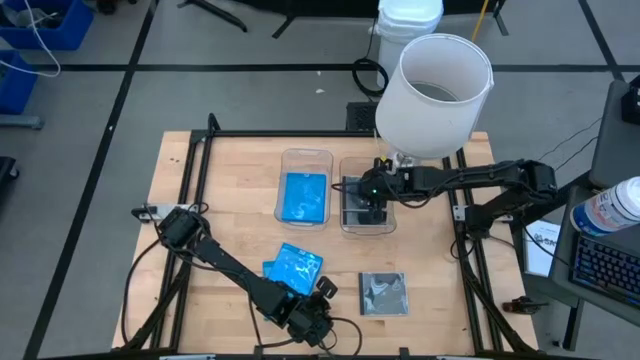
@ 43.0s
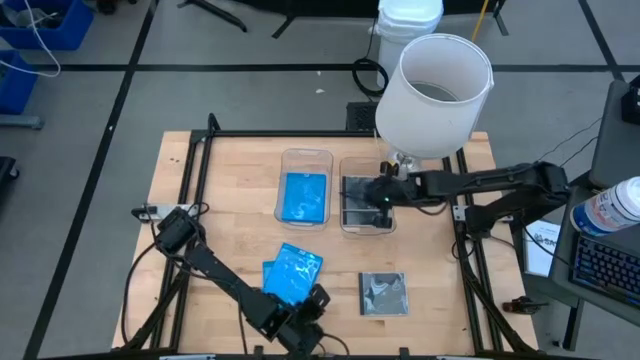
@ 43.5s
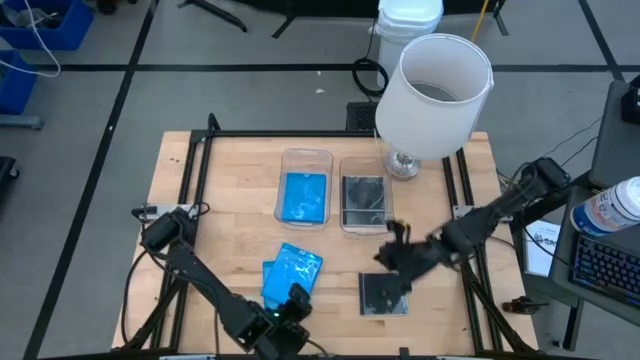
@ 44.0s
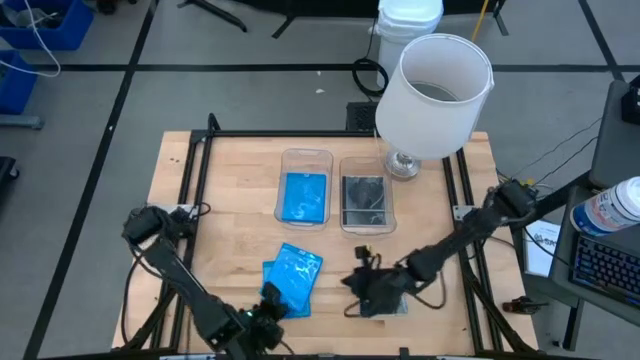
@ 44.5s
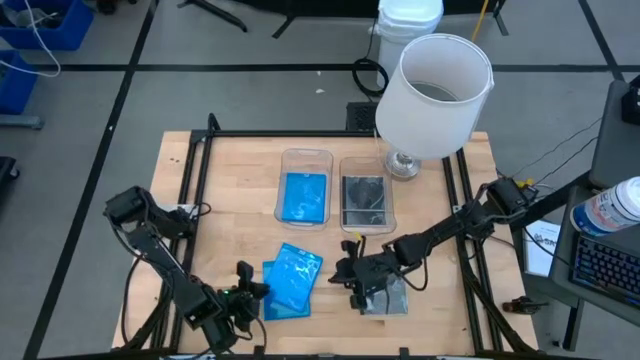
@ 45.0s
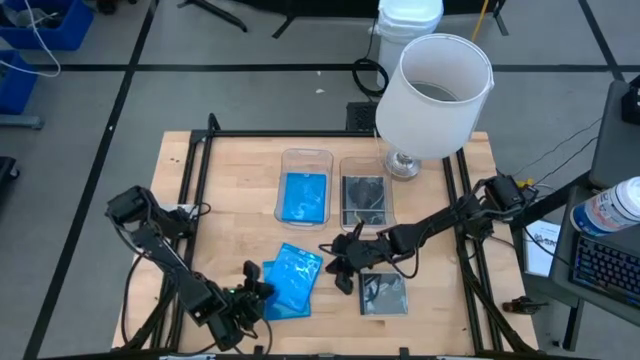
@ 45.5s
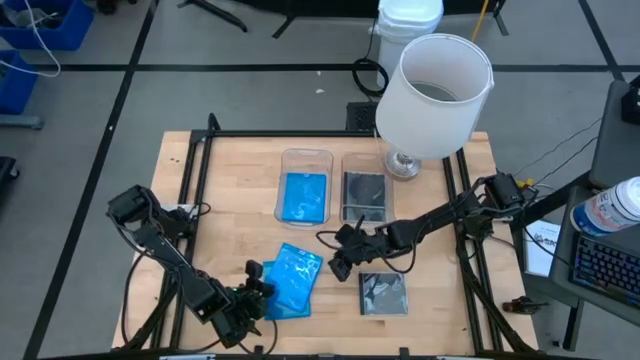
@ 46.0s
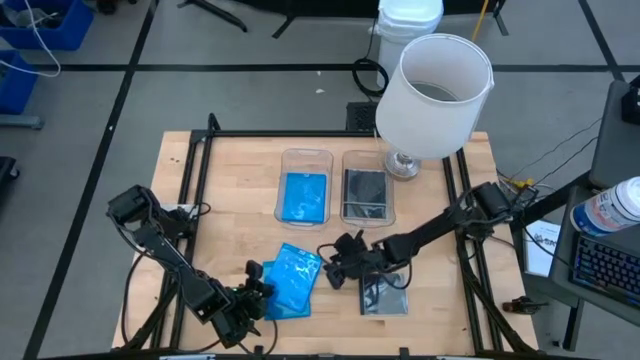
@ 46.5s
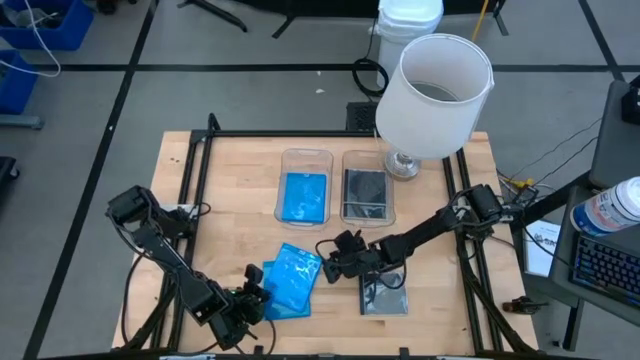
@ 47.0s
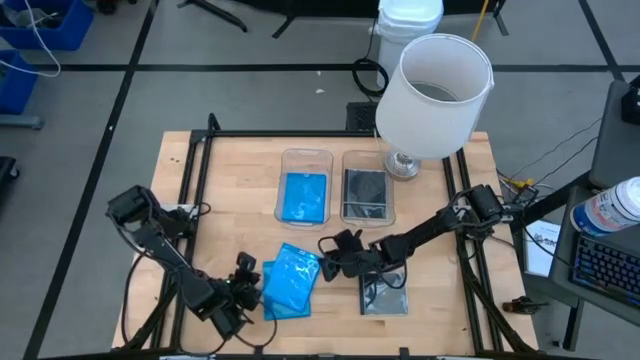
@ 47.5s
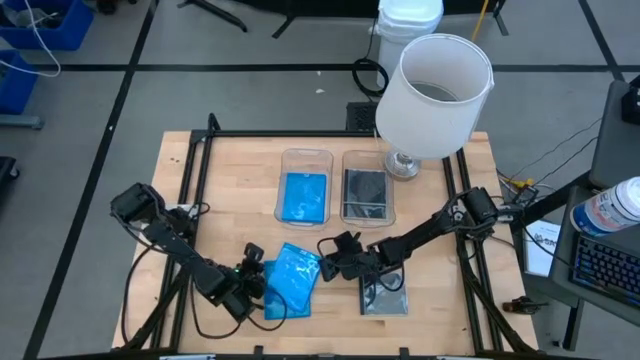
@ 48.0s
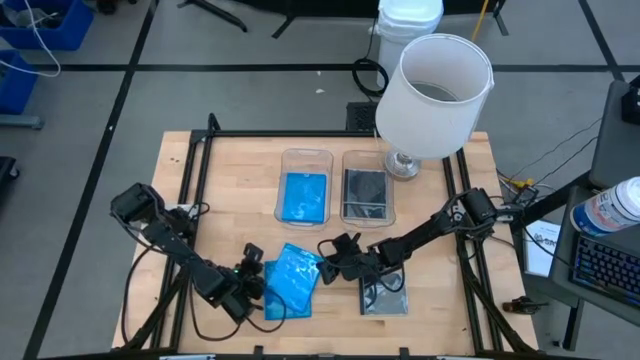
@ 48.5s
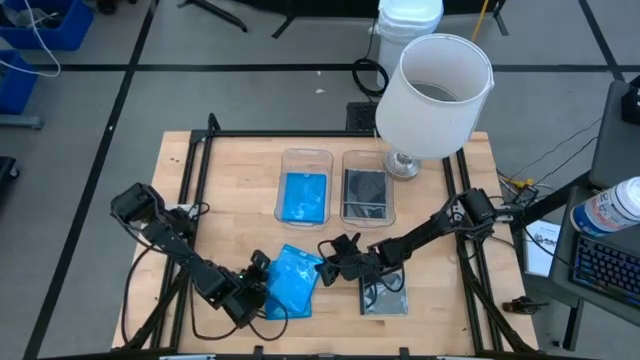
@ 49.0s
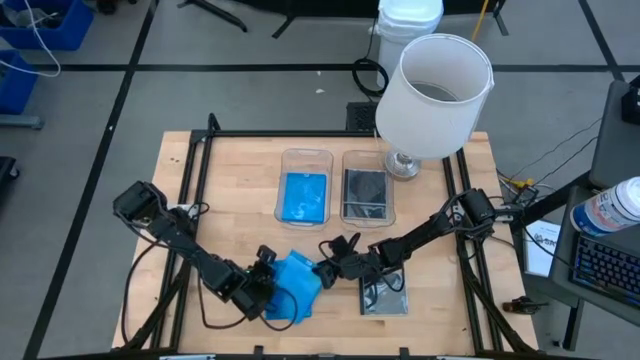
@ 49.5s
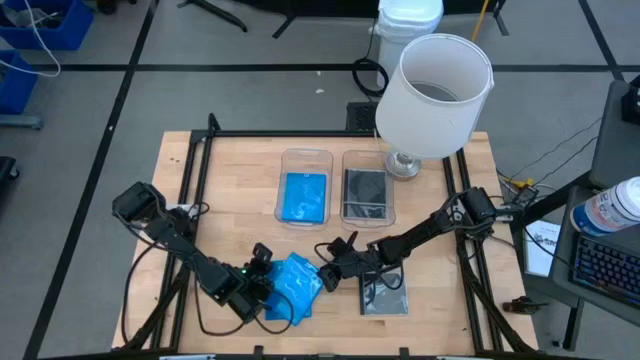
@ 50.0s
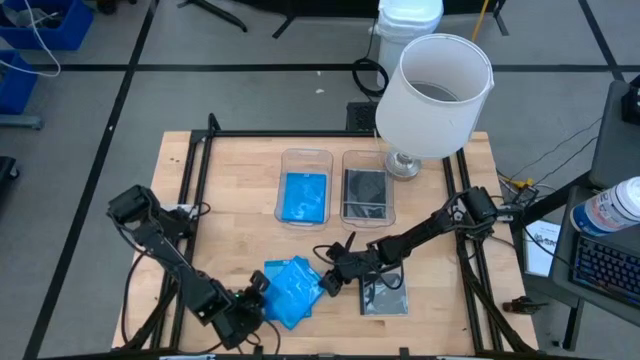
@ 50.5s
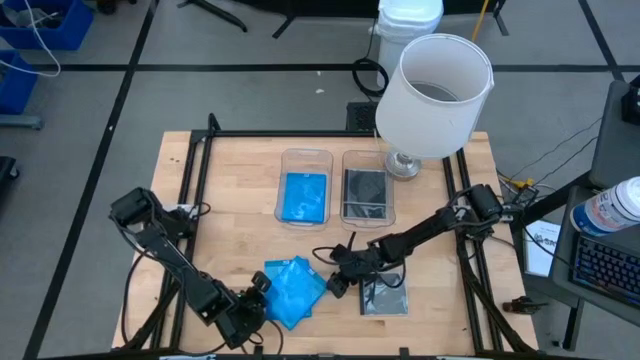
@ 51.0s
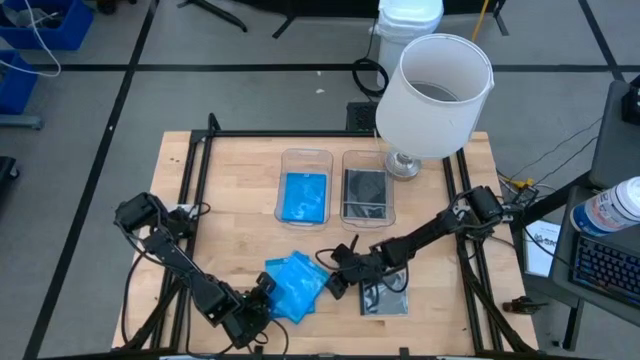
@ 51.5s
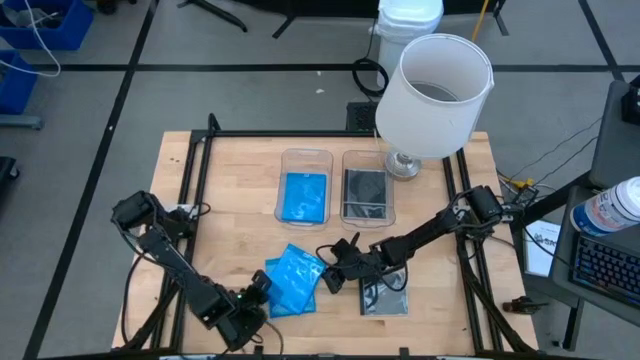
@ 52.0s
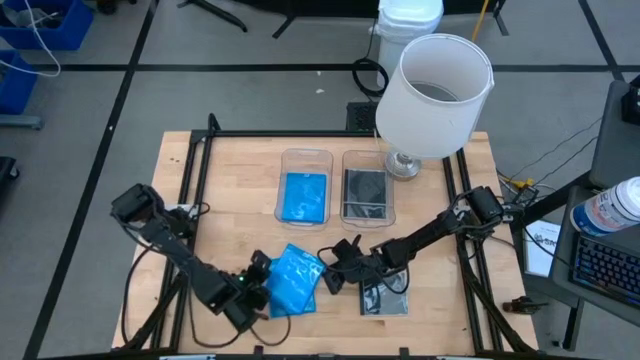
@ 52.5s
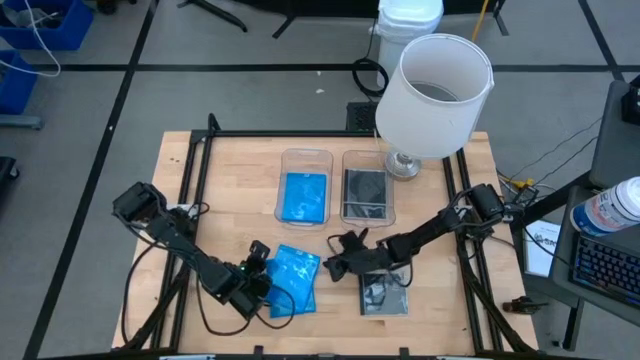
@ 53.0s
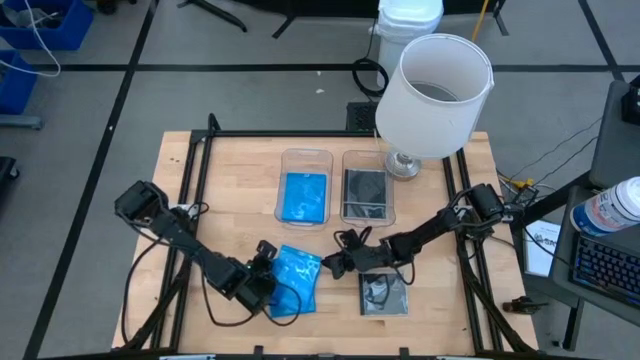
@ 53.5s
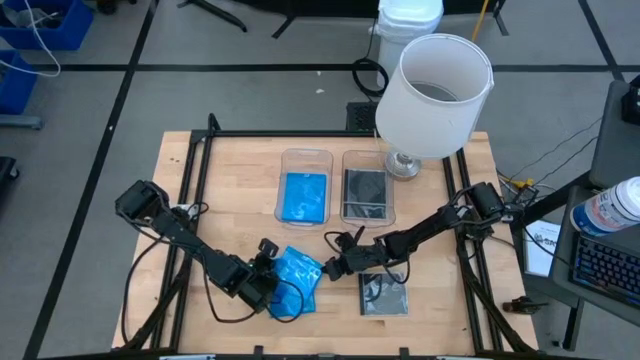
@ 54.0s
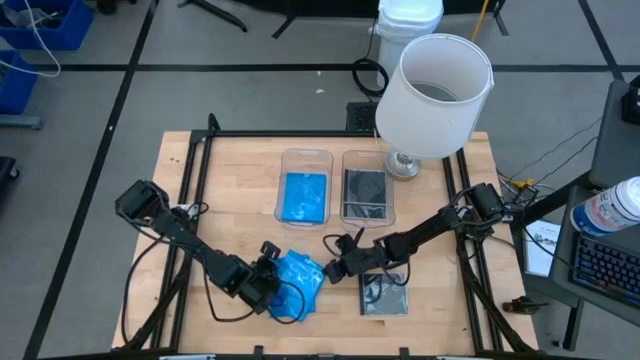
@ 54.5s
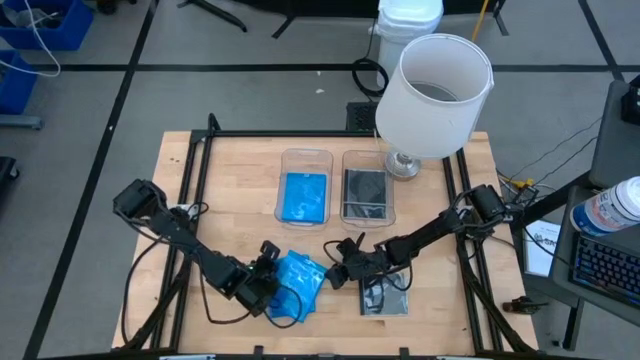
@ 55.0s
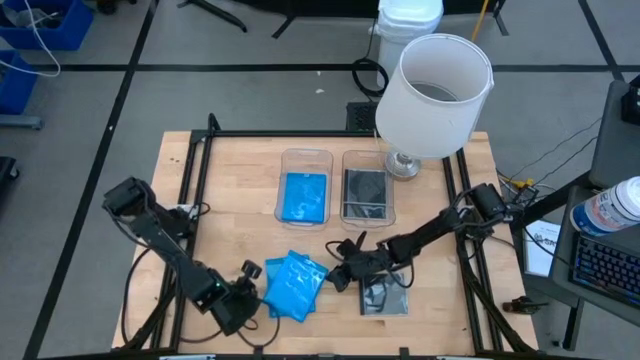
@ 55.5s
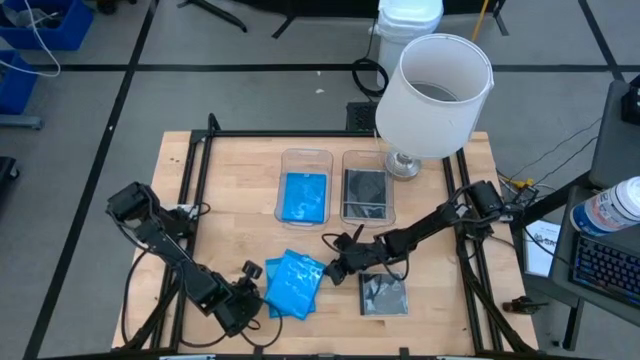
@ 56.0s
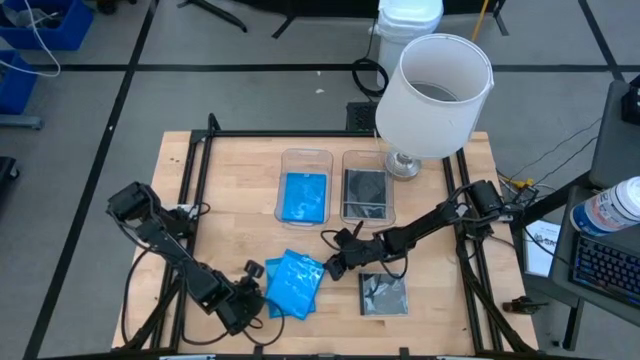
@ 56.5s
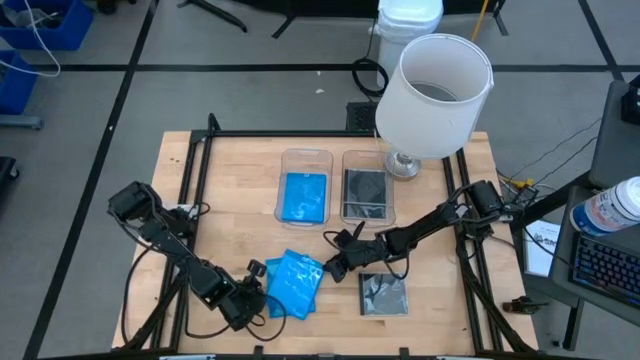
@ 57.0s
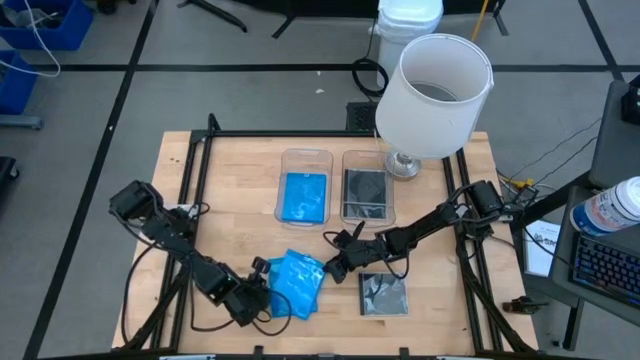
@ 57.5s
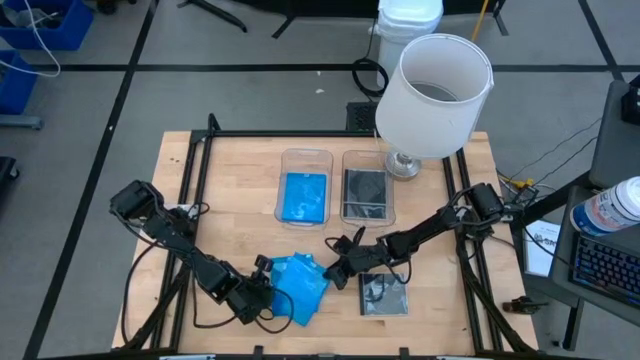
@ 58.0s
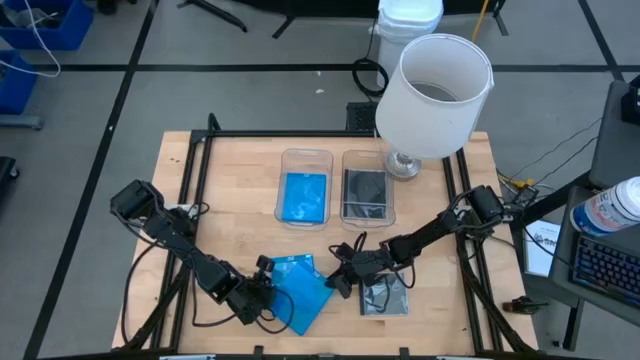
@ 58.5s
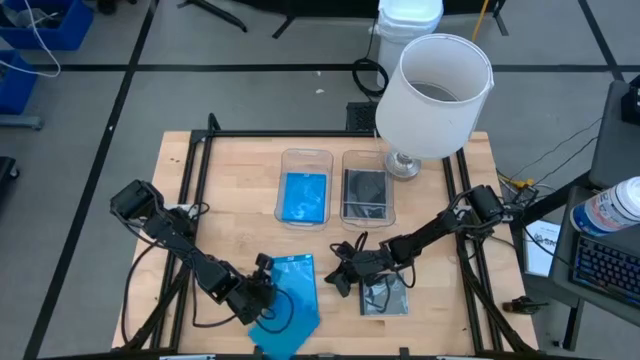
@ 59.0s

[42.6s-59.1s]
Task: Pick & place jewel cases by type
Put the blue cd case into the left transparent bin

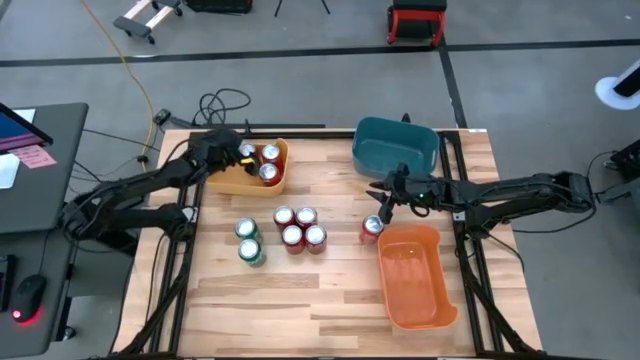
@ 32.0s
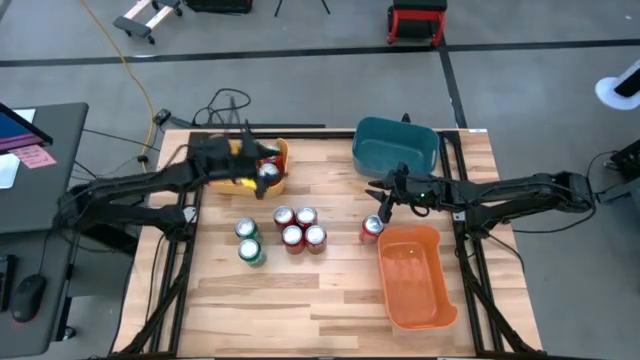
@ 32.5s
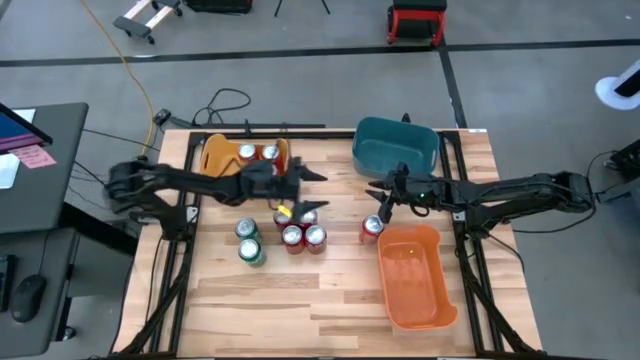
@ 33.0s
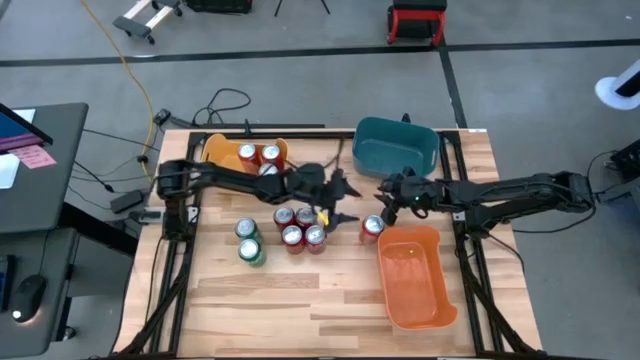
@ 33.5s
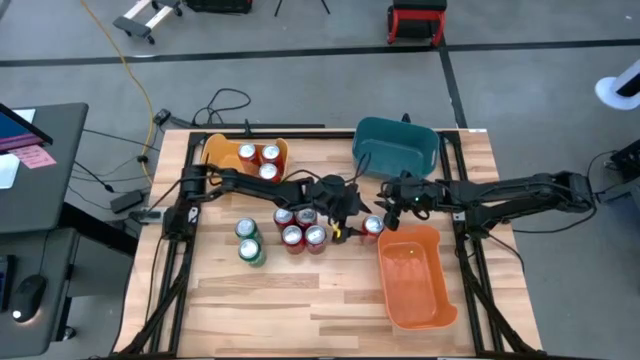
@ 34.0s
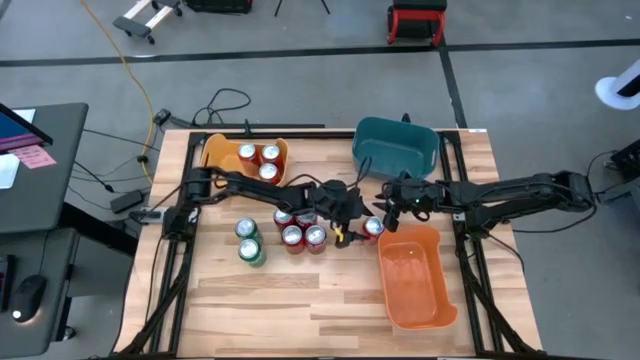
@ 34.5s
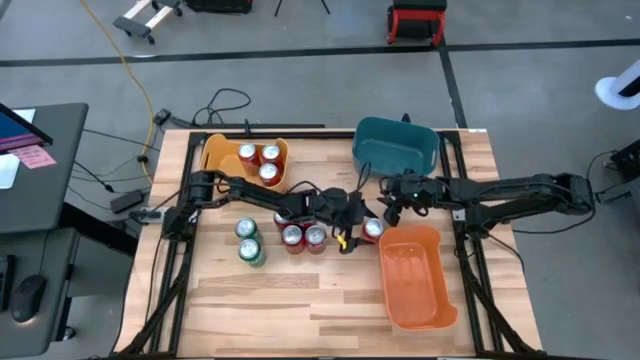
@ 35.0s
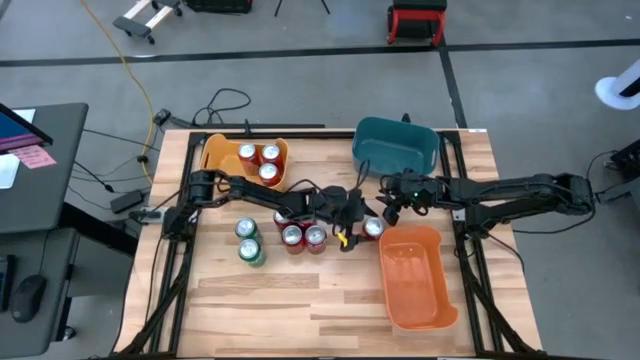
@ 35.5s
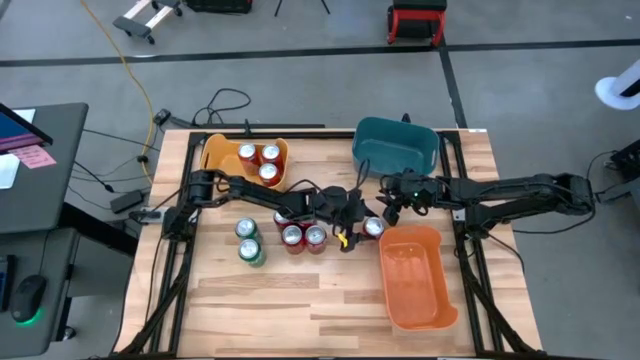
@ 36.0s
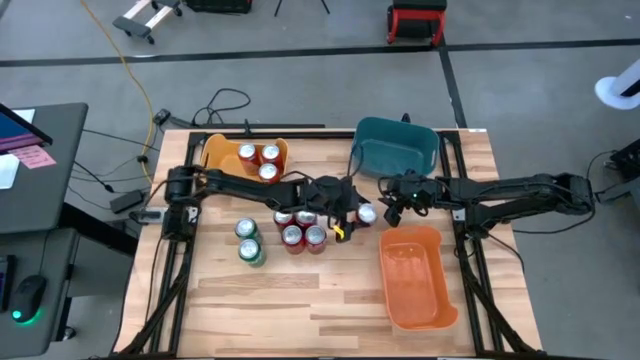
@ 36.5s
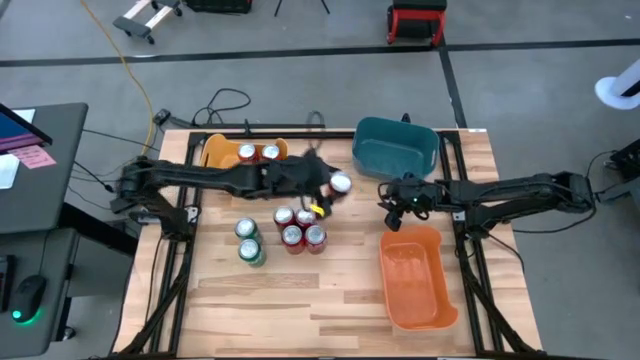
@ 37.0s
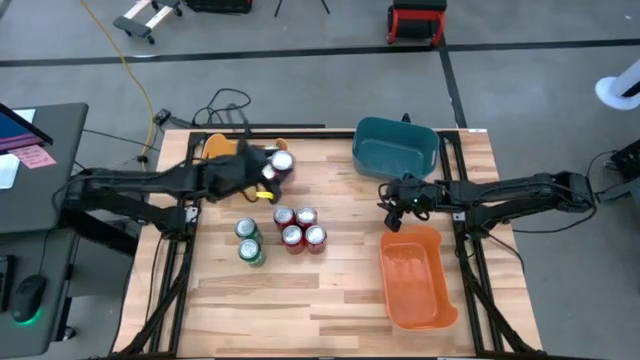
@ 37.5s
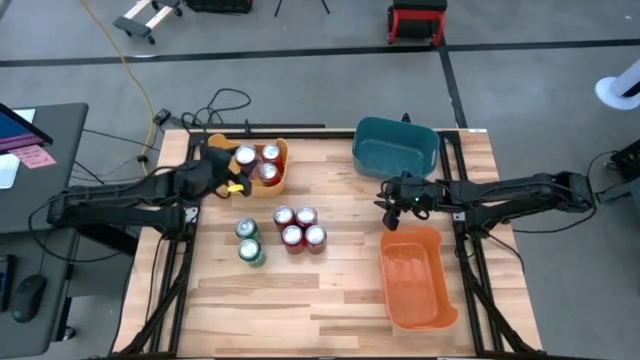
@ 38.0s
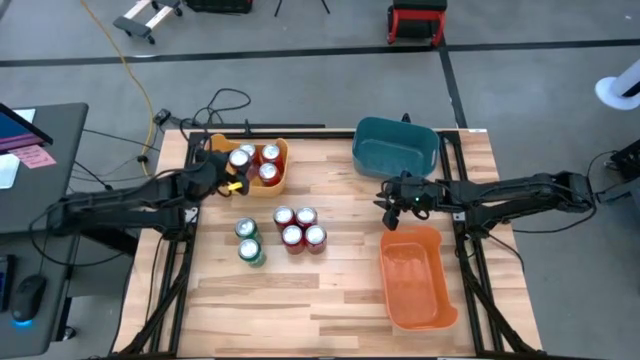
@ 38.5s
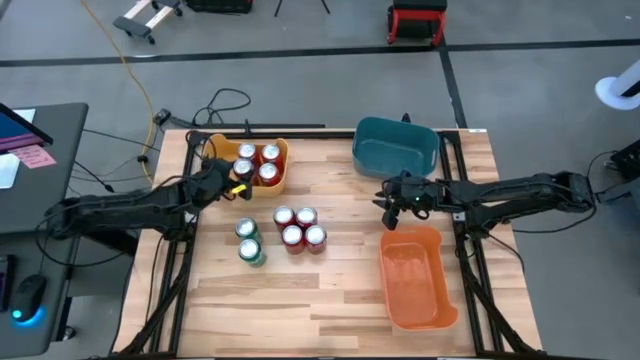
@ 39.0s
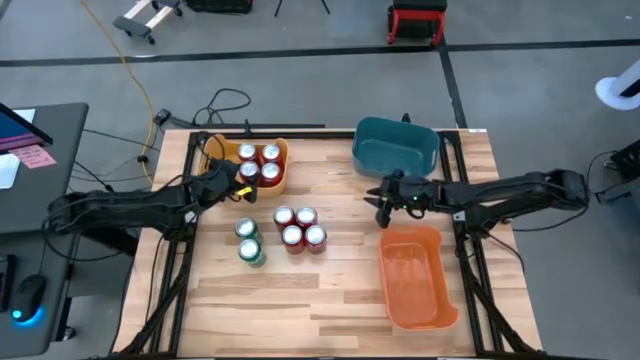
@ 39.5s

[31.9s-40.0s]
Task: Sort soda cans
Put the orange soda can into the yellow bin
